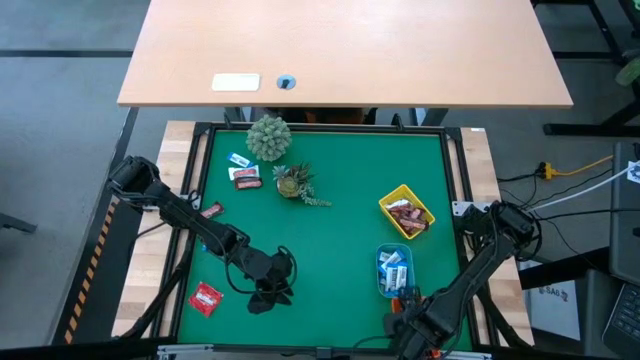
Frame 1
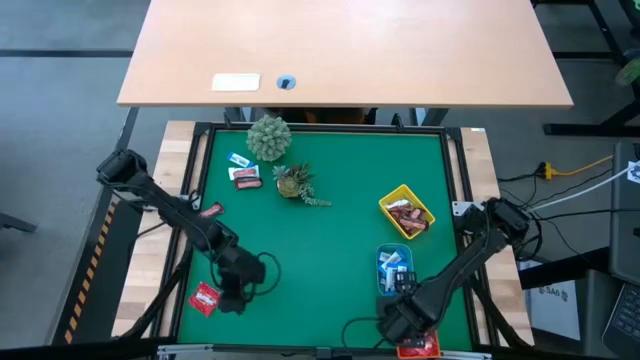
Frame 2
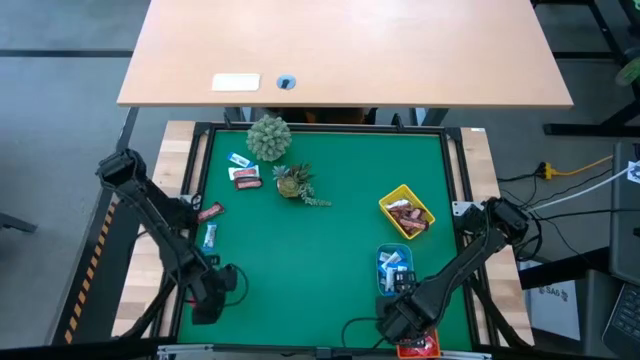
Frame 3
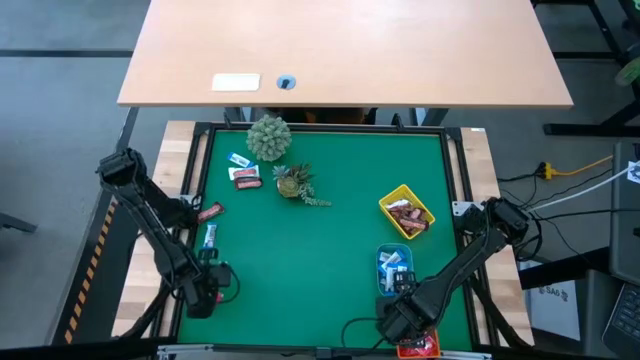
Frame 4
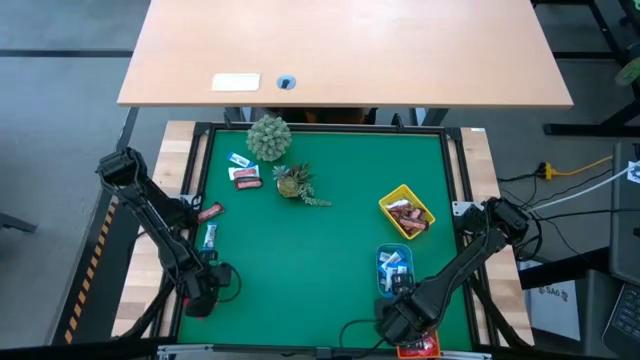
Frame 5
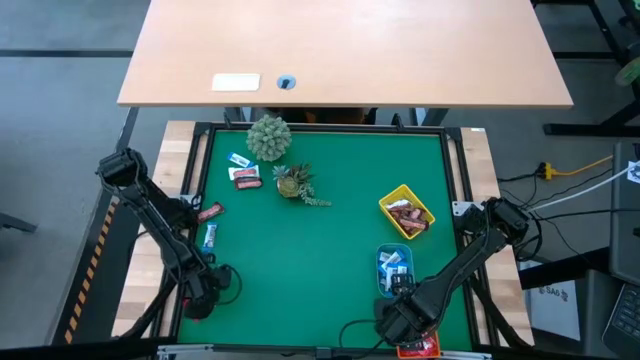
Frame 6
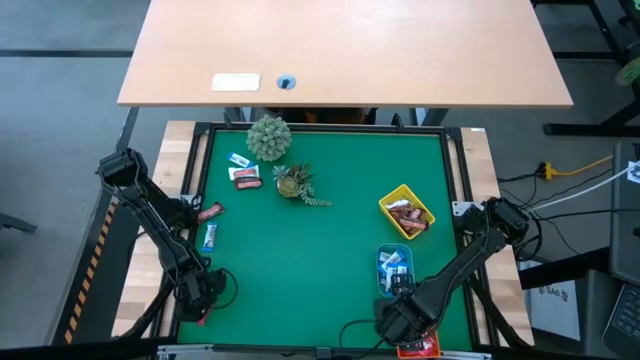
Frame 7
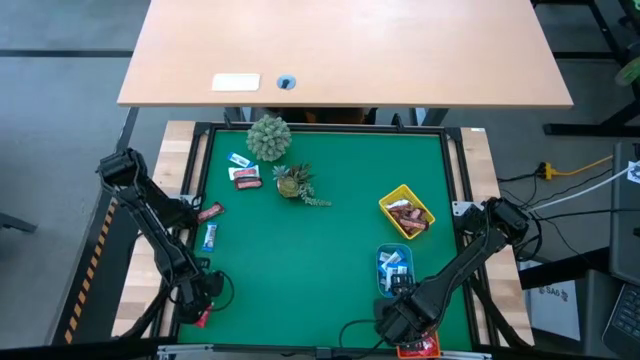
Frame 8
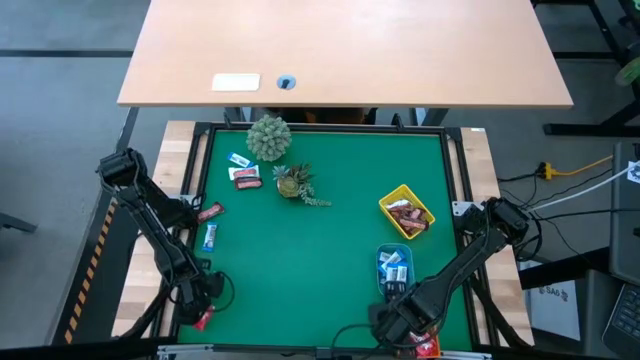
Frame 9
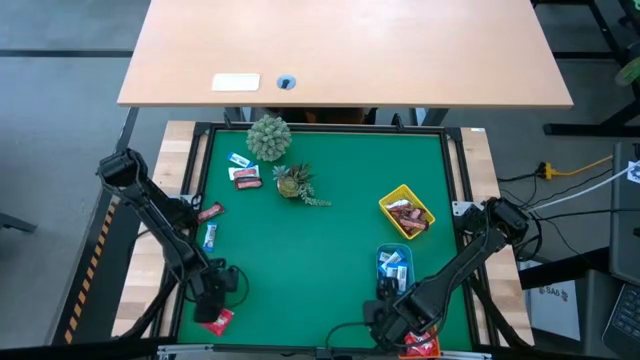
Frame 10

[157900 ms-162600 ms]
Task: Sort candy
Put the red candy into the orange bin

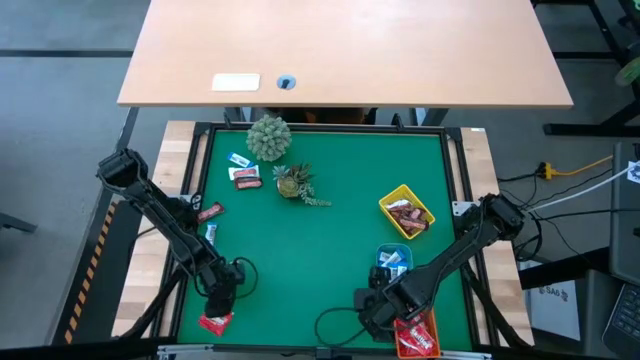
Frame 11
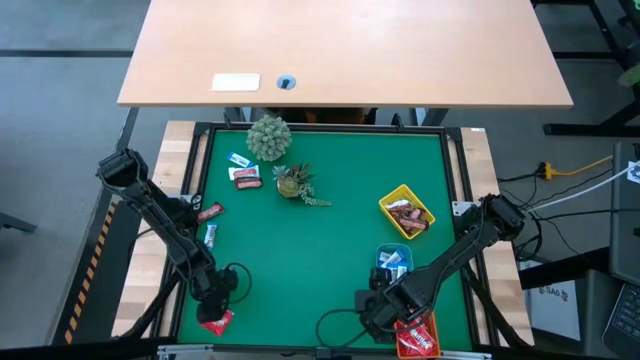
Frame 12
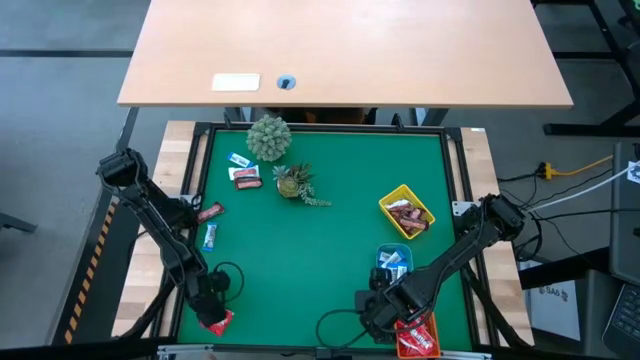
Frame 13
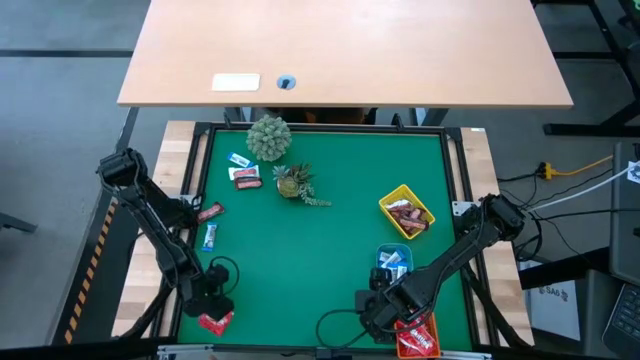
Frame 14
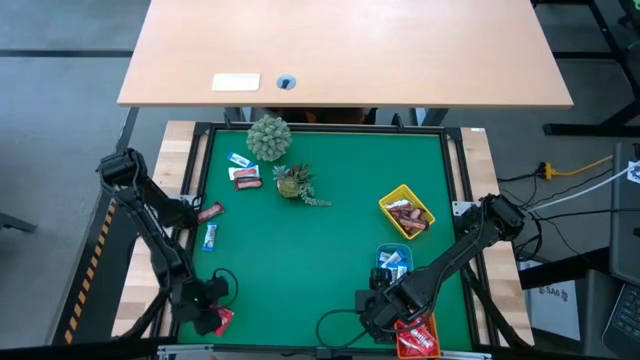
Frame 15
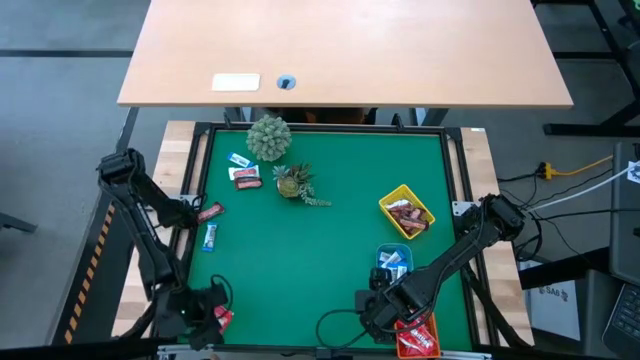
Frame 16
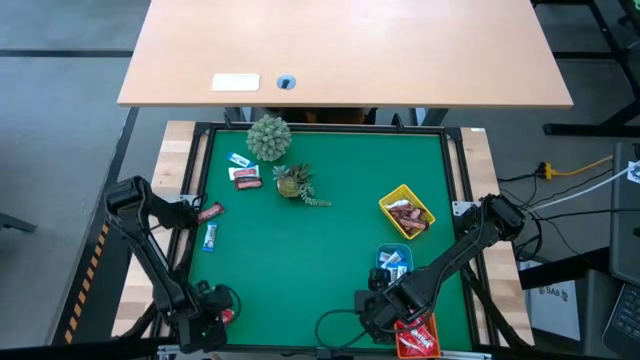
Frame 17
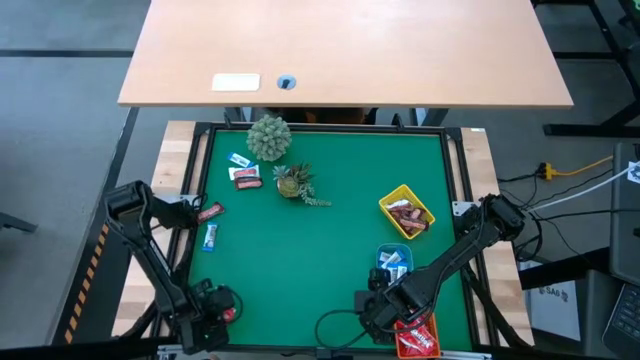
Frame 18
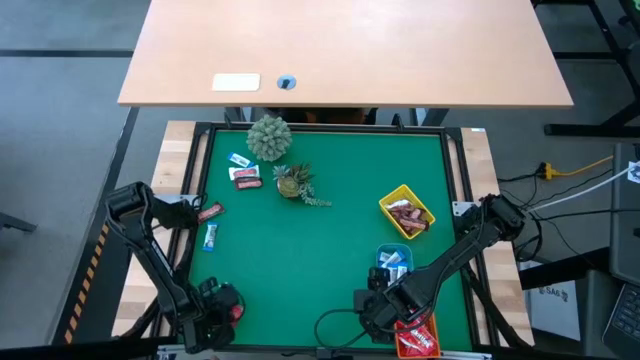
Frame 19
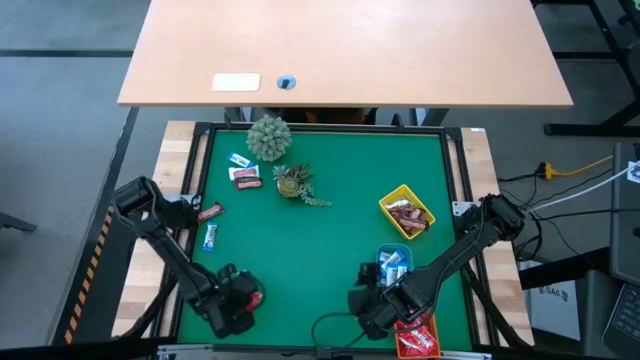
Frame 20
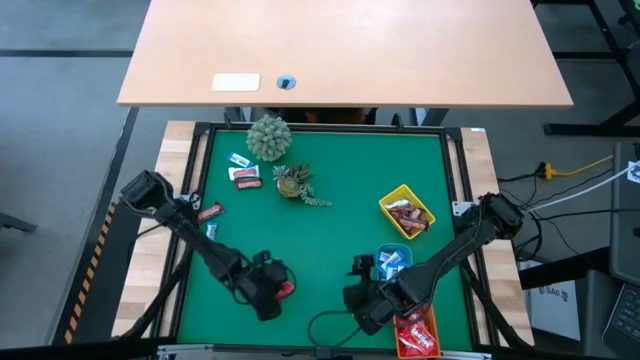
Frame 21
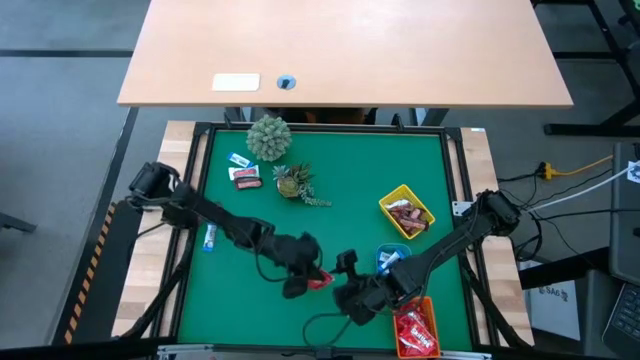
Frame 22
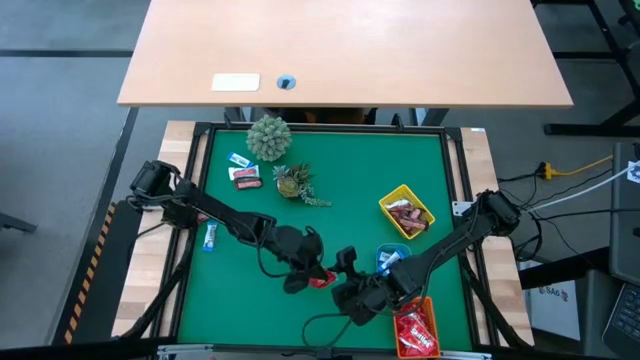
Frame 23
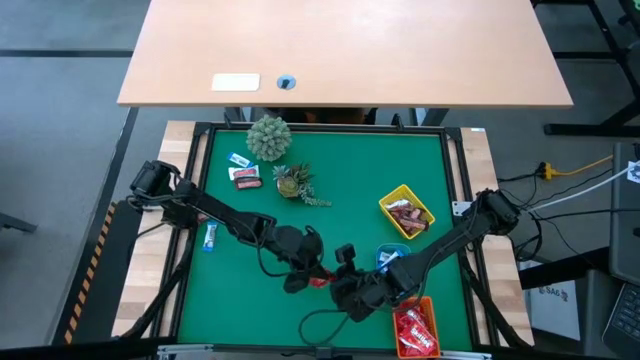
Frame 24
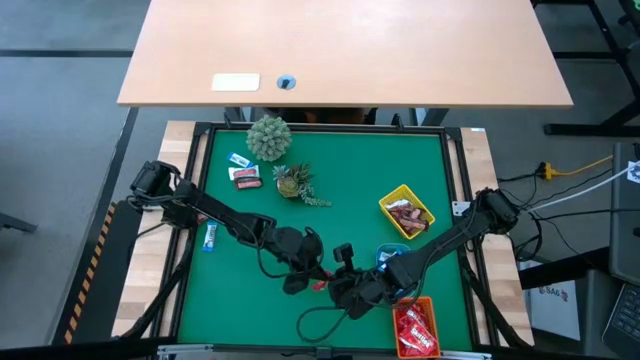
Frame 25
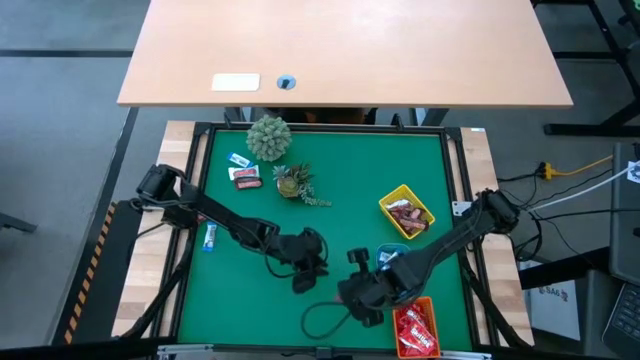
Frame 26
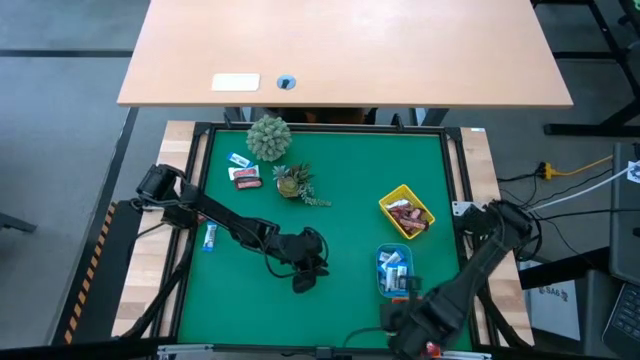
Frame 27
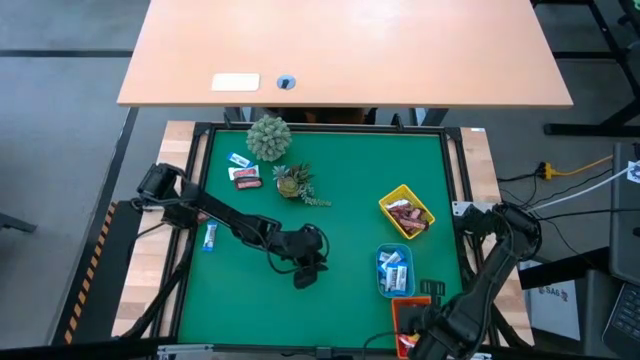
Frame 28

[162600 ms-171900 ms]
Put the red candy into the orange bin

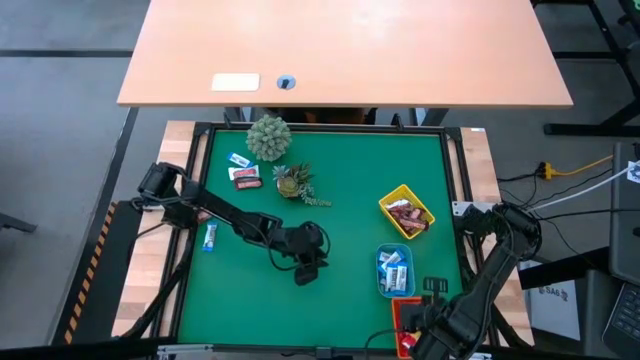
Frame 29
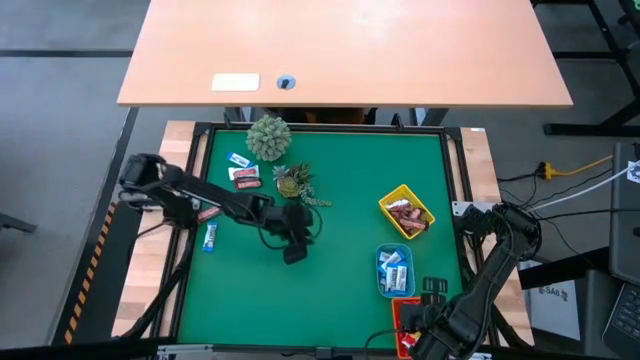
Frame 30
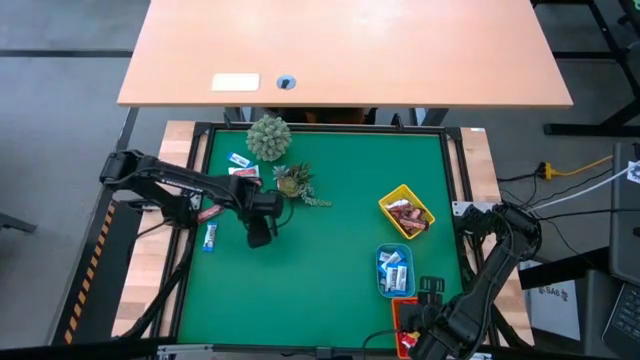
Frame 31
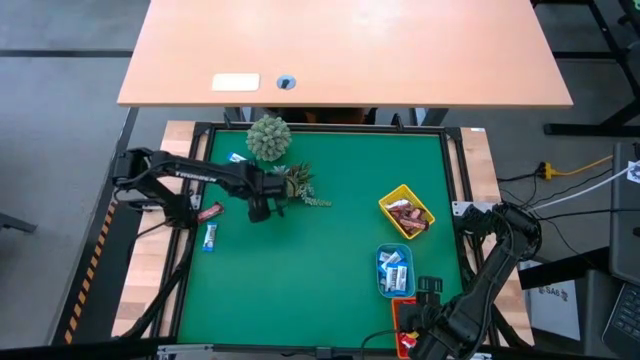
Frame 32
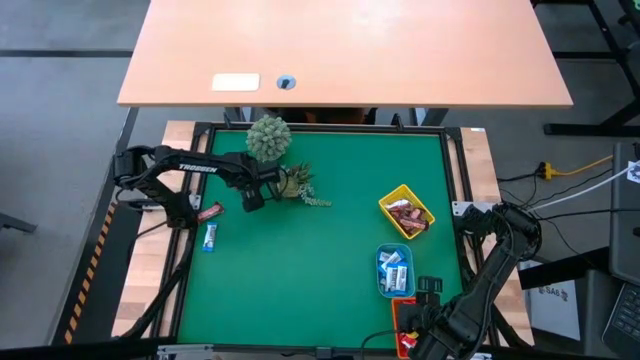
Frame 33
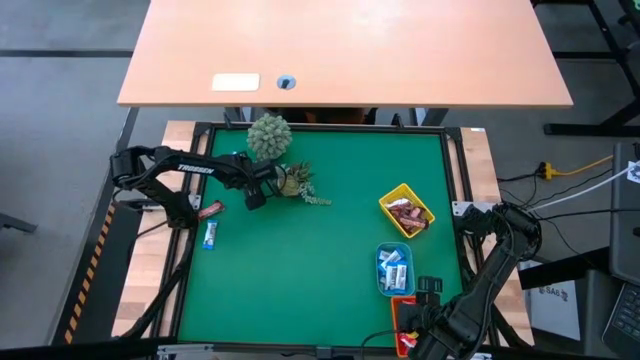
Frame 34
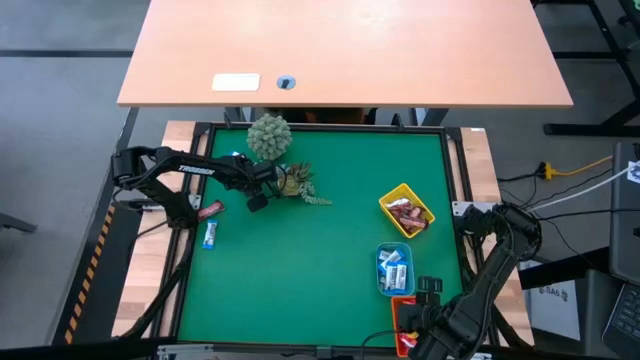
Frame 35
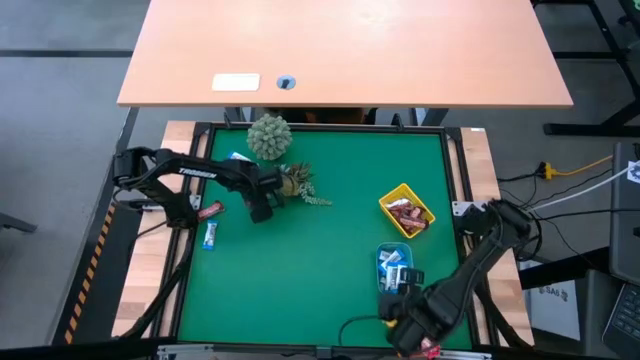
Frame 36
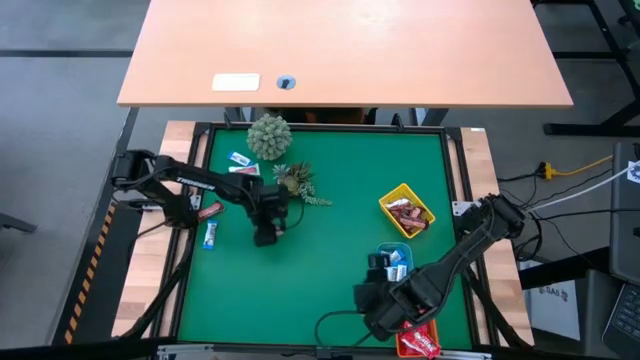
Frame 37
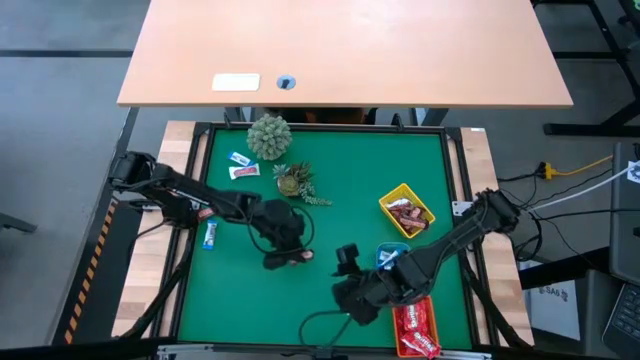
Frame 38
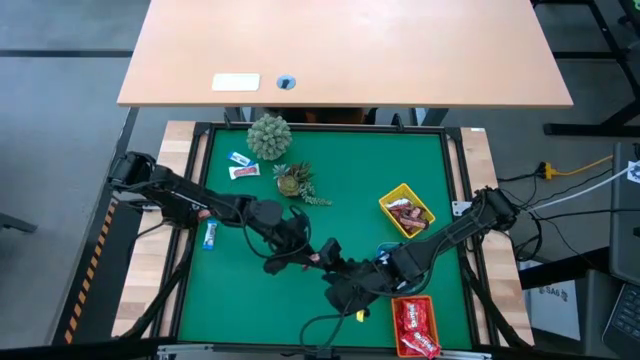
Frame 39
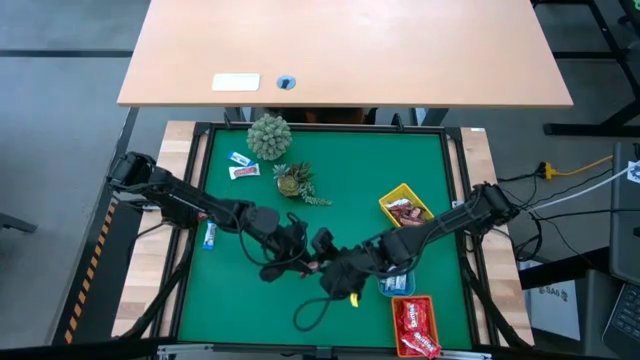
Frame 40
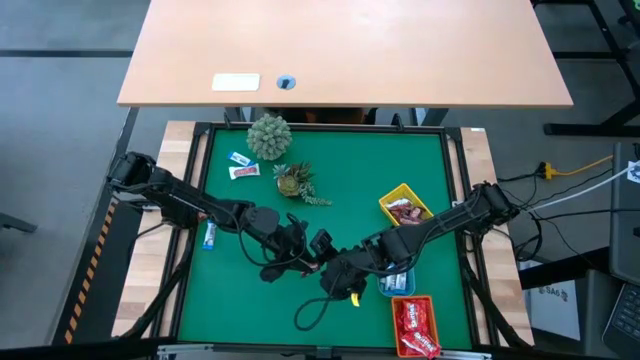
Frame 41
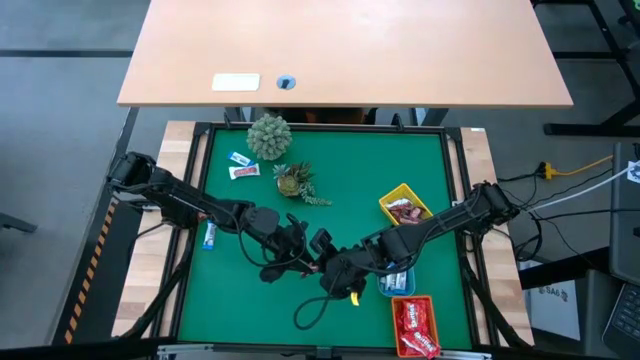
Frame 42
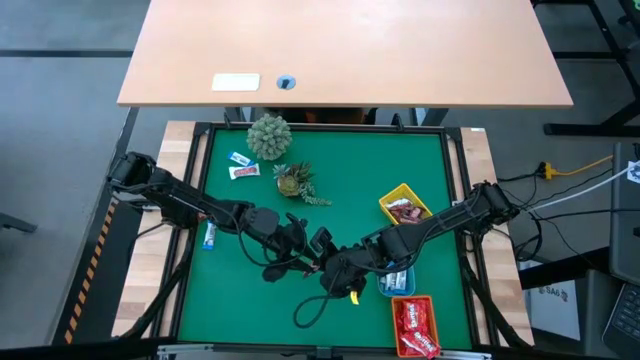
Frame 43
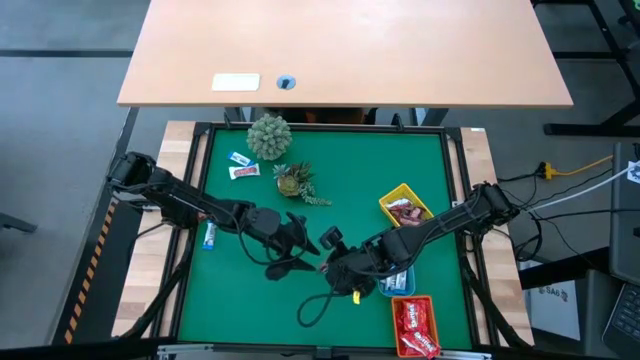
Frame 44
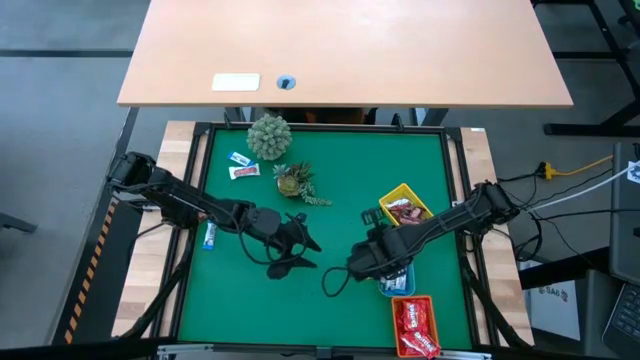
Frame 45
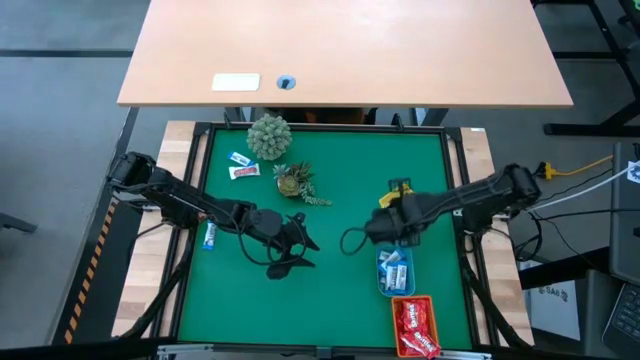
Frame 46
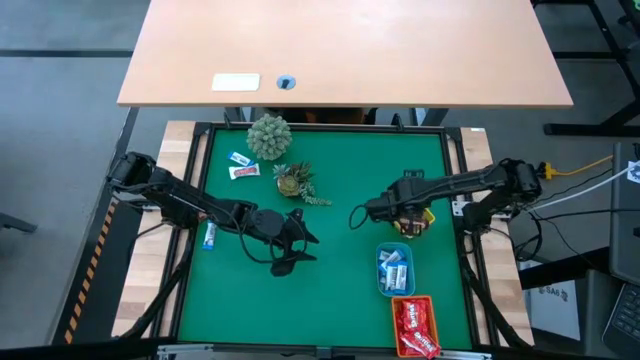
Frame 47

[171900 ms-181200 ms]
Put the brown candy into the yellow bin
